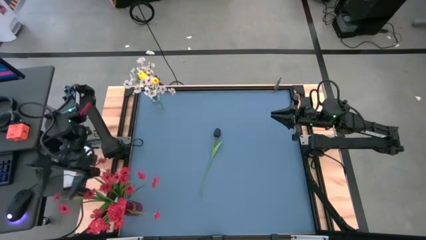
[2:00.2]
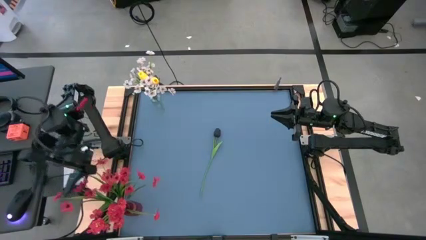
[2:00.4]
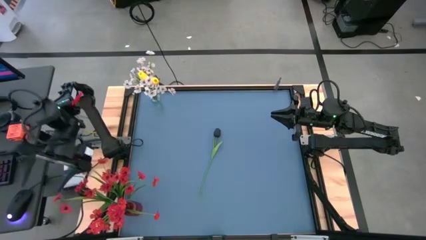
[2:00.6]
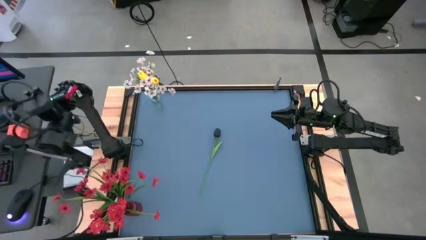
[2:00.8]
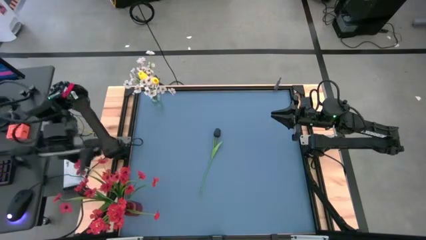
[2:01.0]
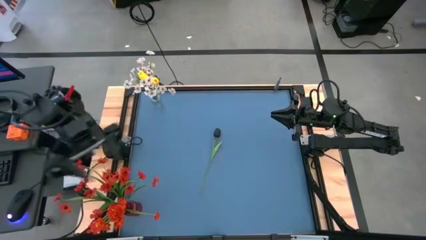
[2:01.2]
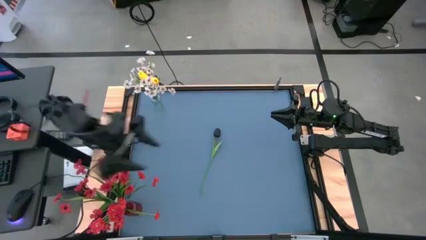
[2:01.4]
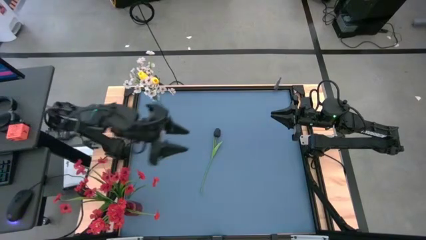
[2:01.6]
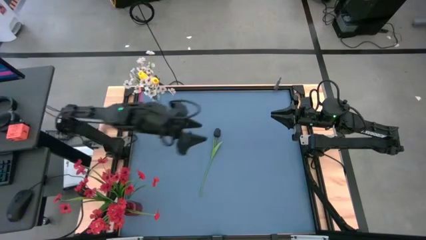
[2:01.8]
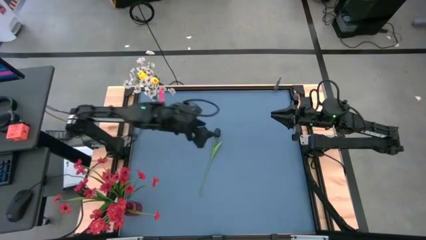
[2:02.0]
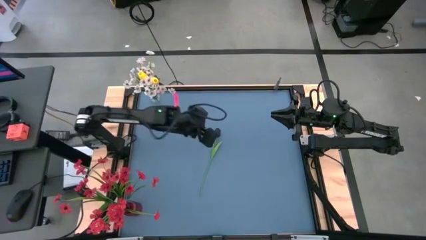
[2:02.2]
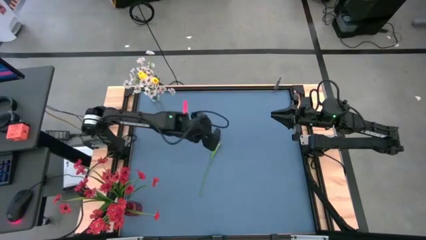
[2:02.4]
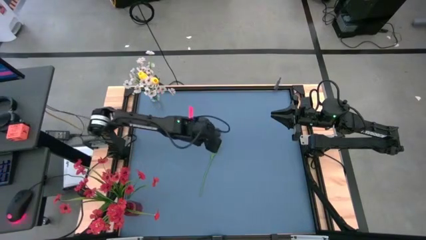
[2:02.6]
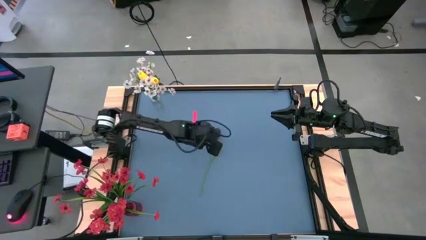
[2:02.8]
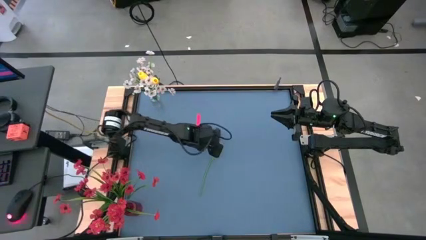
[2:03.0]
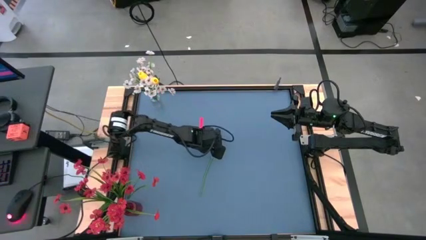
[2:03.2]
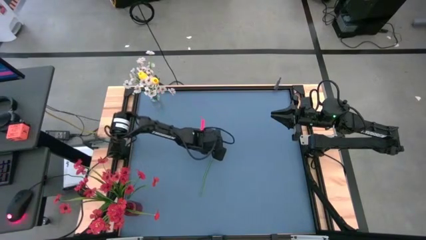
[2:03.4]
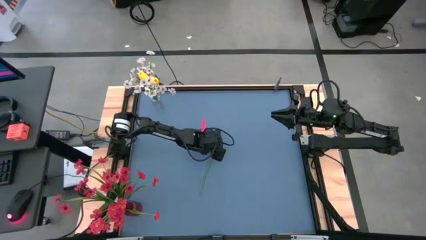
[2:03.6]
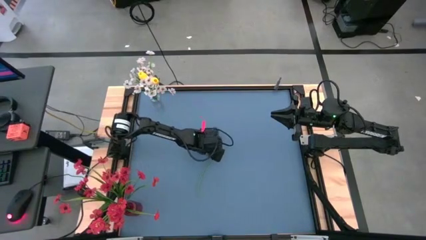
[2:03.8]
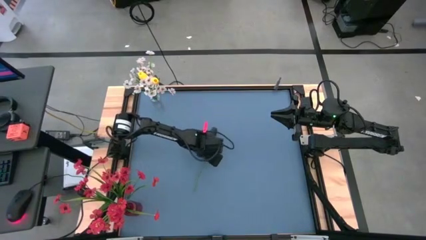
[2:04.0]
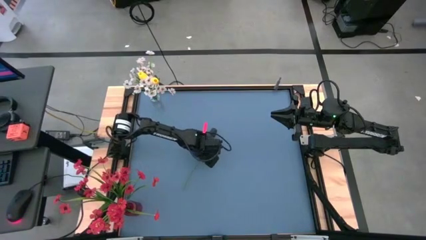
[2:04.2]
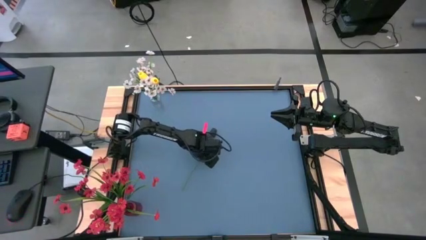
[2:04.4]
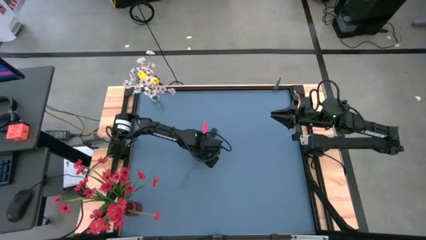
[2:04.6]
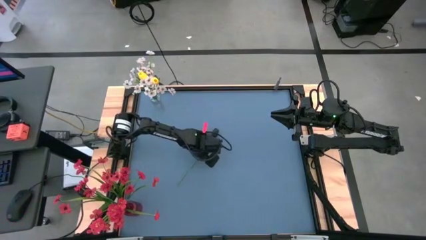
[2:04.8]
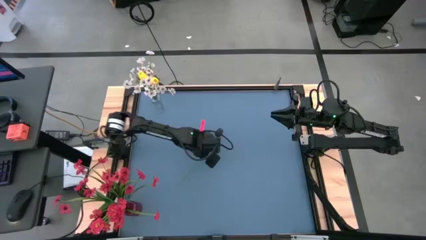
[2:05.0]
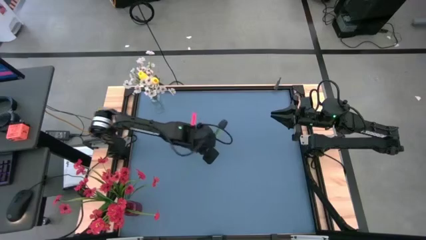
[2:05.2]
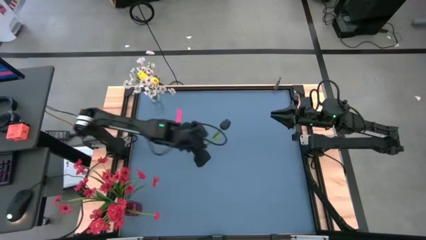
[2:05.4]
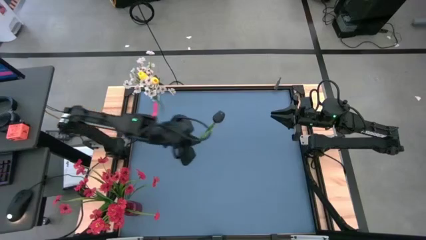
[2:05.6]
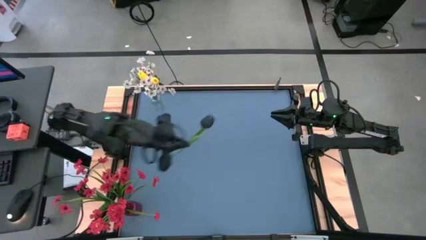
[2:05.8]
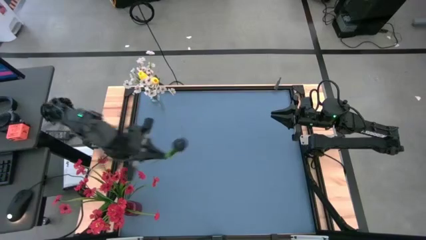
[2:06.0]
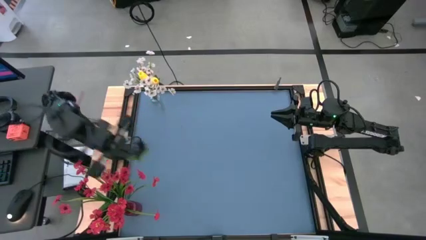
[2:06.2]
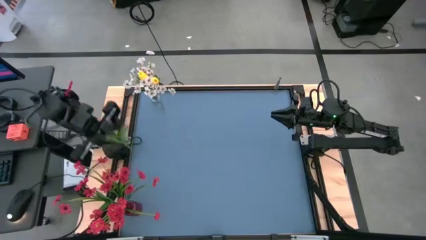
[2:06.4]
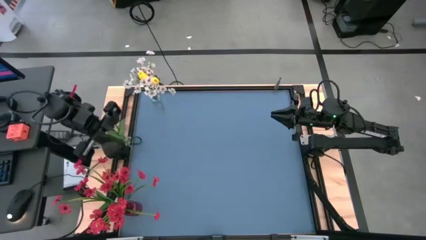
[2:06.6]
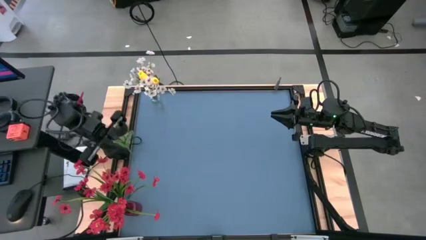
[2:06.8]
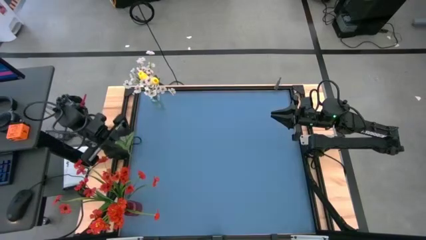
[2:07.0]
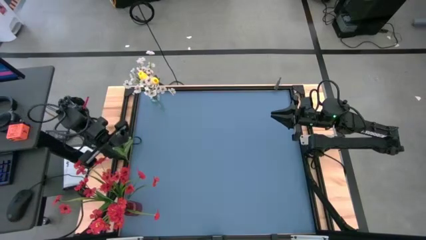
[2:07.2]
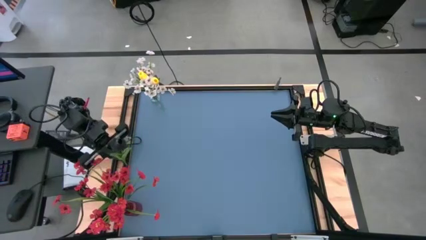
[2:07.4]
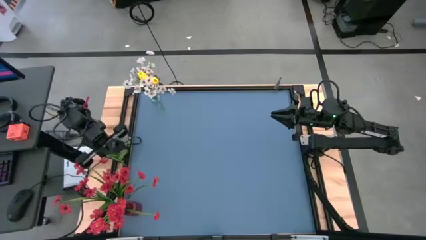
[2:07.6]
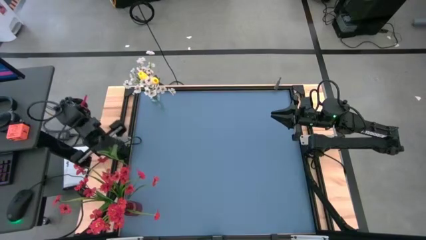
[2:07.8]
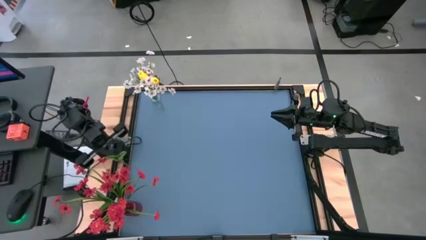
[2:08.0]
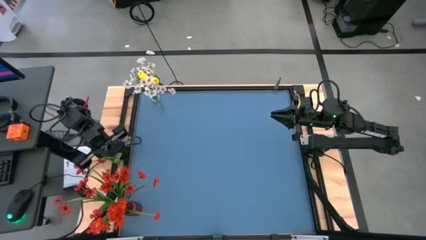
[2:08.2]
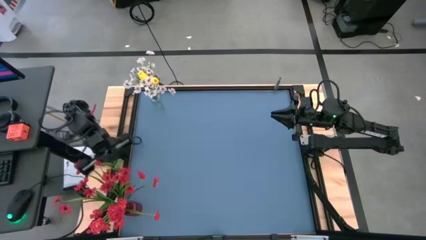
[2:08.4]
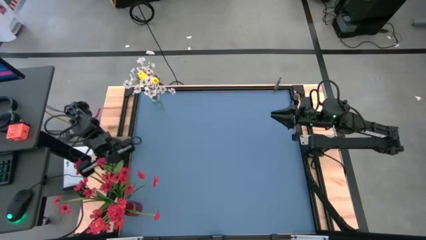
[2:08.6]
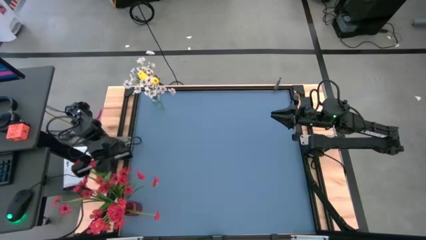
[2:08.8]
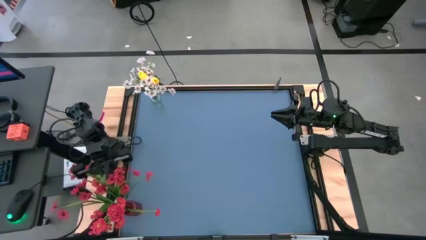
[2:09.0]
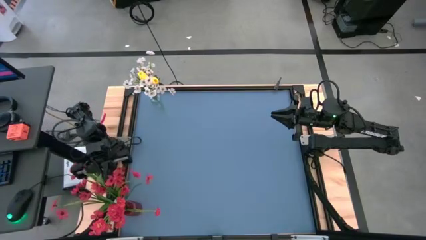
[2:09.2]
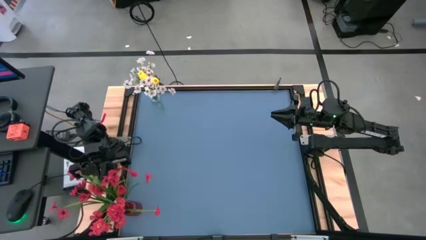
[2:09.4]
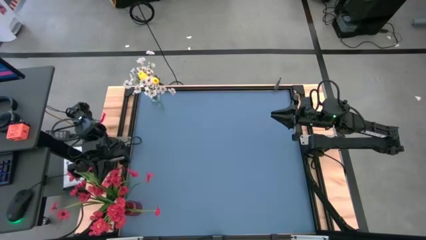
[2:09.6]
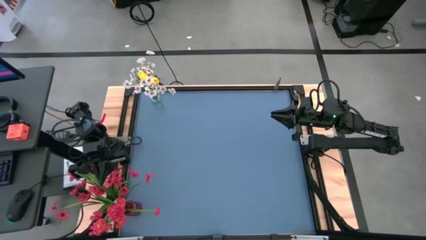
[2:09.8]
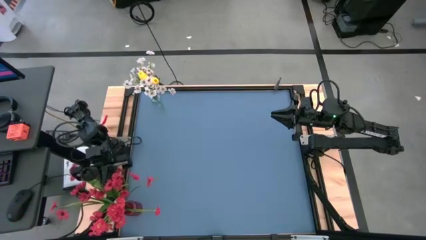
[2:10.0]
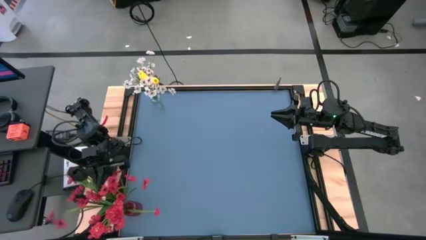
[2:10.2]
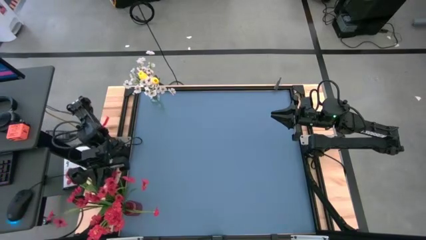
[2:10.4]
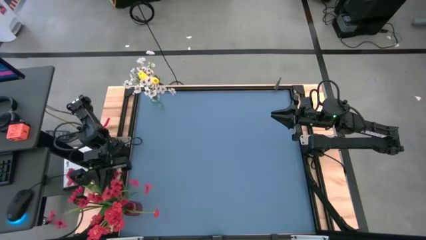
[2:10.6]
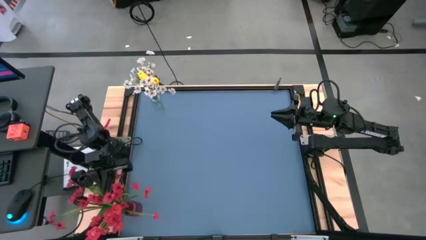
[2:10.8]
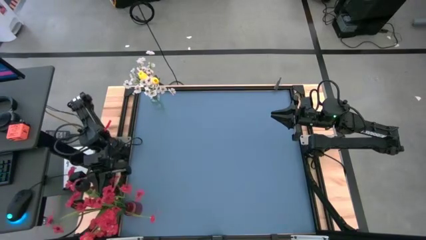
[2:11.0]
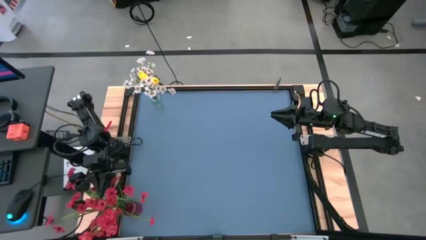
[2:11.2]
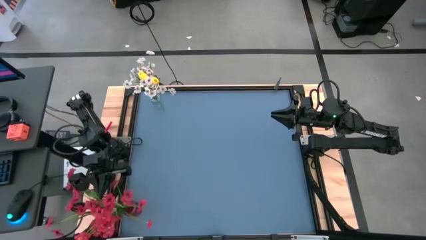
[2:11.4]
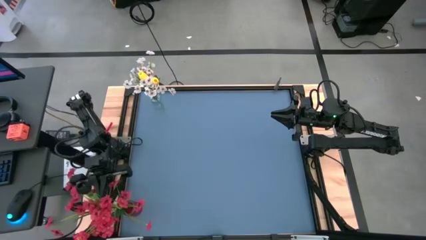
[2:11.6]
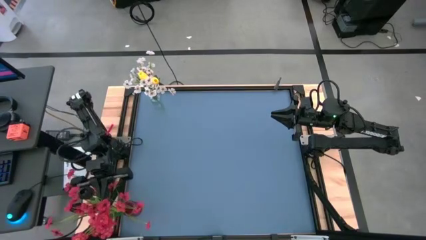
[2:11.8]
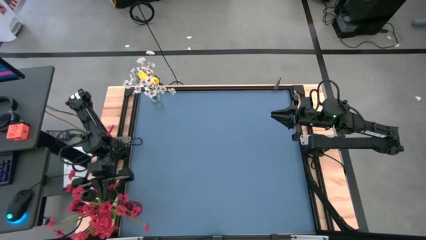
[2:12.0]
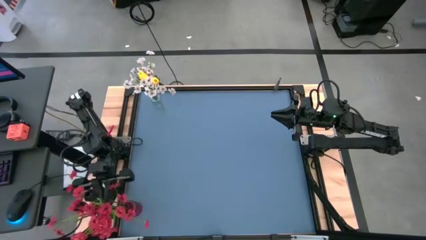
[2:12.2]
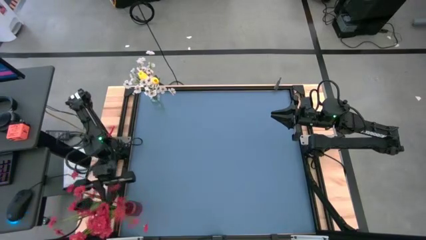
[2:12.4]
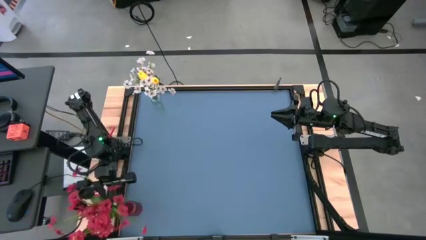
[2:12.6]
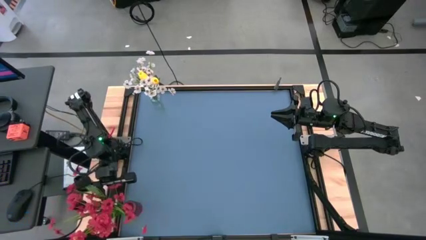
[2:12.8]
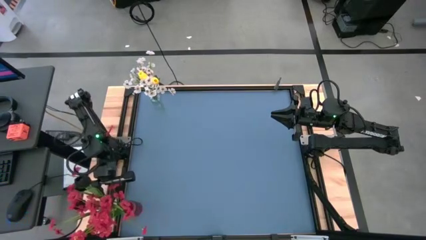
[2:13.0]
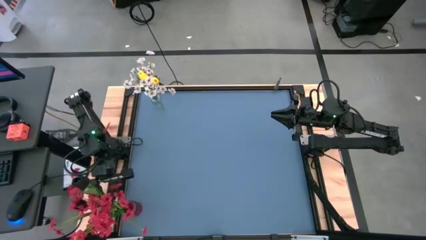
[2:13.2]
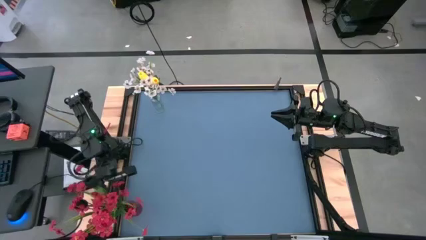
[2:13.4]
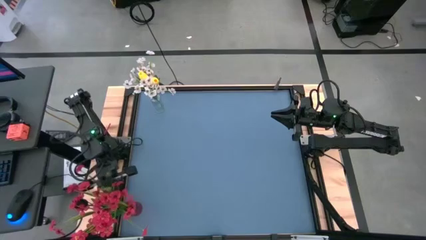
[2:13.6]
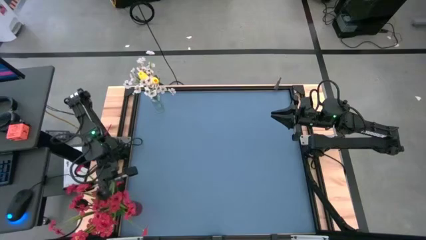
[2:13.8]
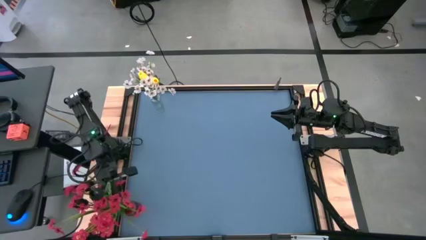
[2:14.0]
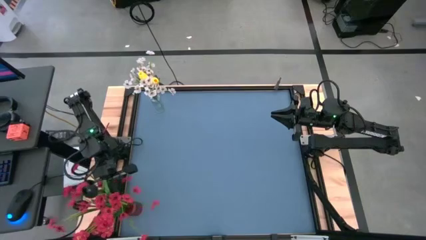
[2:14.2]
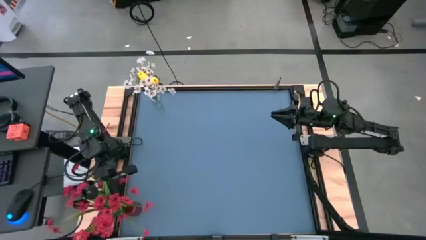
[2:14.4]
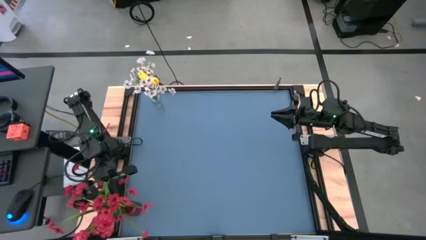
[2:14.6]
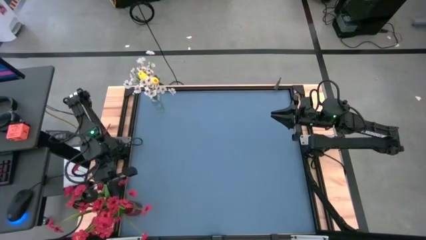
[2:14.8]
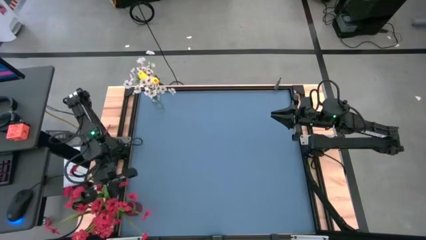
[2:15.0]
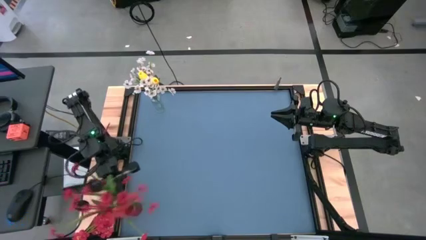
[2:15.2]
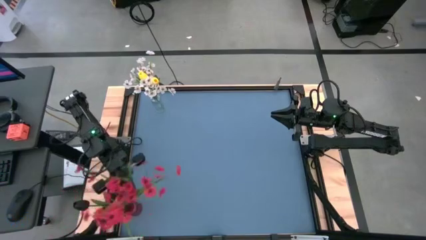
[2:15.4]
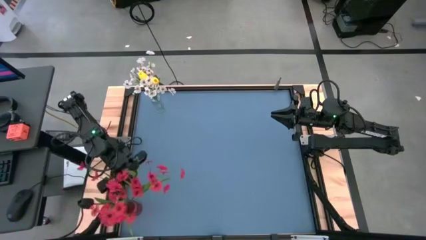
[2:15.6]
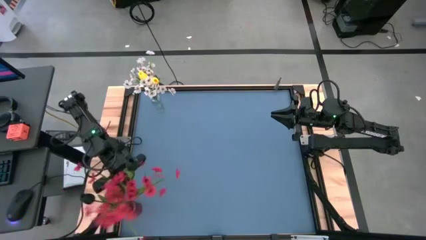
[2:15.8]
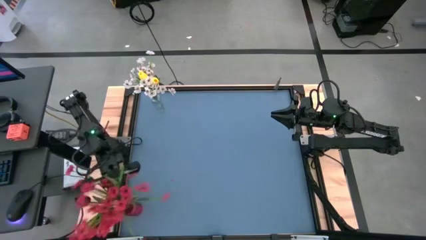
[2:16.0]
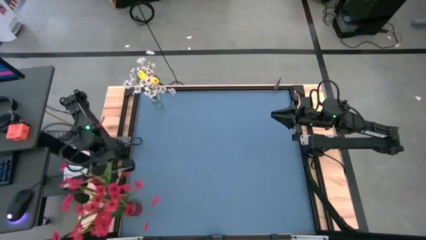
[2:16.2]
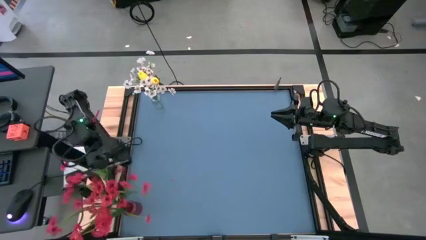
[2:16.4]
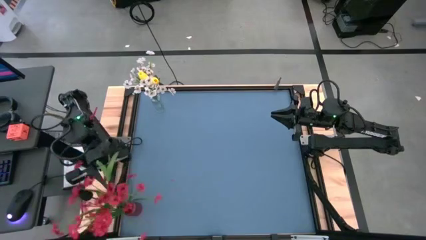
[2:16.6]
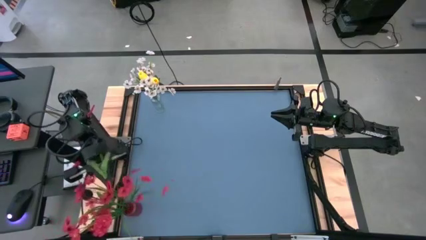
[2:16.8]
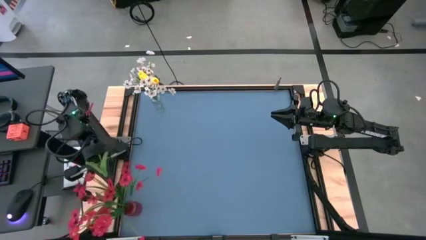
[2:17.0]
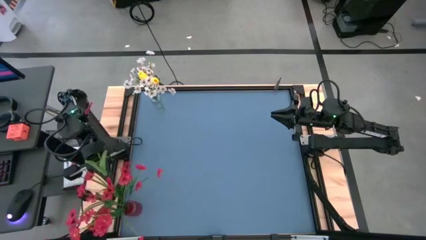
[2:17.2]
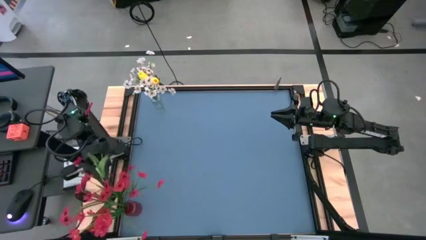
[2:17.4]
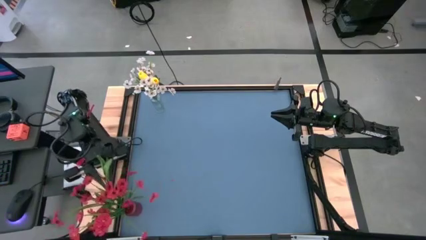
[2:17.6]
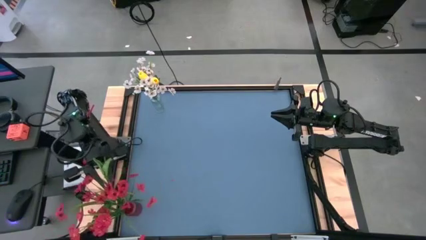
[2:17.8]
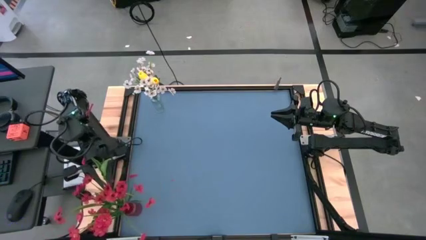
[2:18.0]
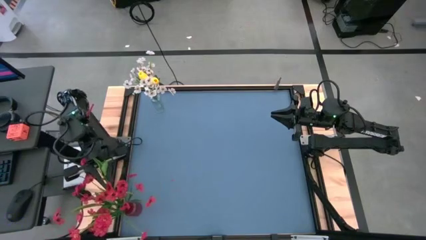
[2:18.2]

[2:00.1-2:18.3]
Task: Sort flowers into vase by color
Put the black flower into the red vase
